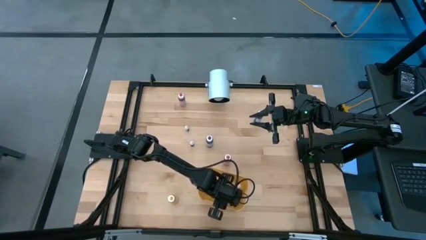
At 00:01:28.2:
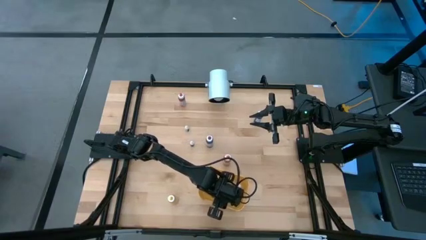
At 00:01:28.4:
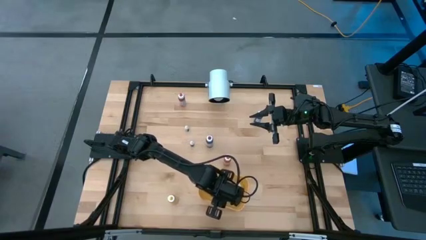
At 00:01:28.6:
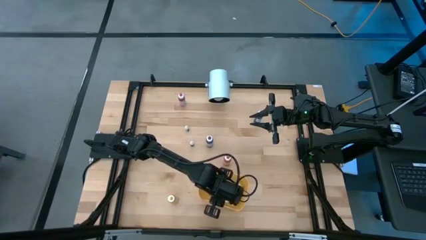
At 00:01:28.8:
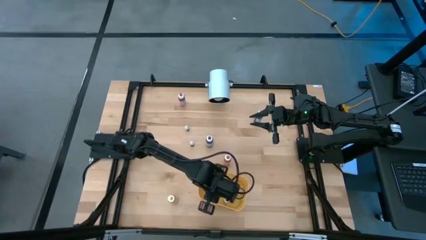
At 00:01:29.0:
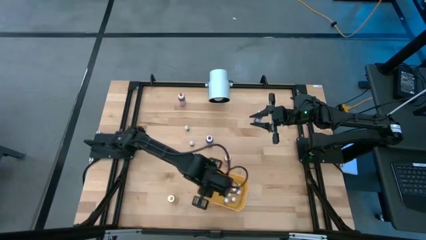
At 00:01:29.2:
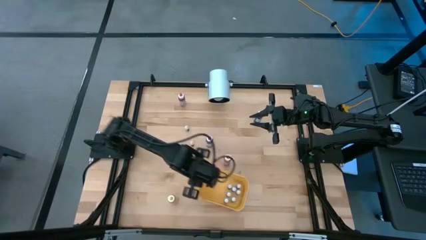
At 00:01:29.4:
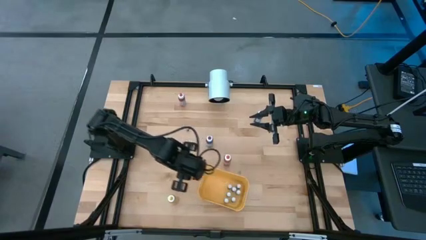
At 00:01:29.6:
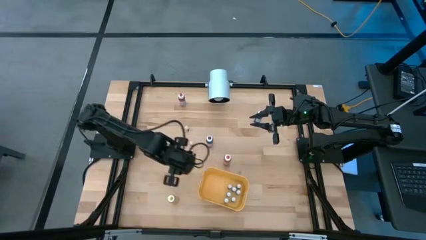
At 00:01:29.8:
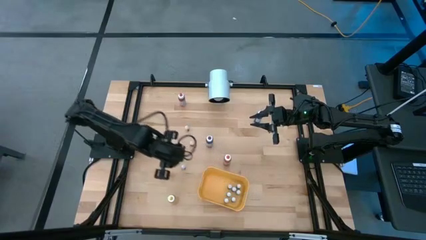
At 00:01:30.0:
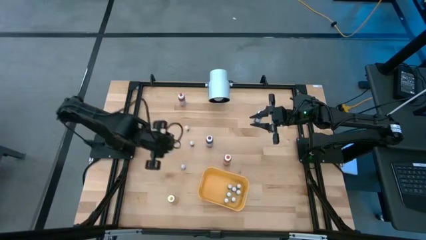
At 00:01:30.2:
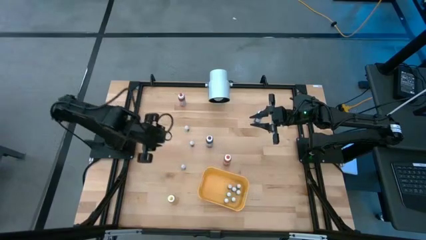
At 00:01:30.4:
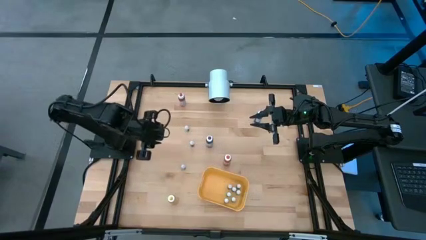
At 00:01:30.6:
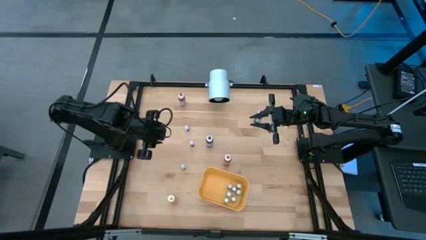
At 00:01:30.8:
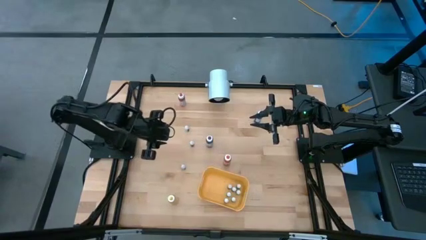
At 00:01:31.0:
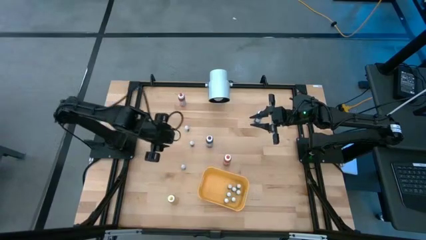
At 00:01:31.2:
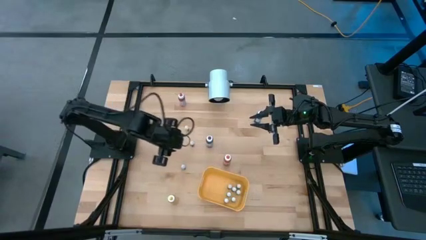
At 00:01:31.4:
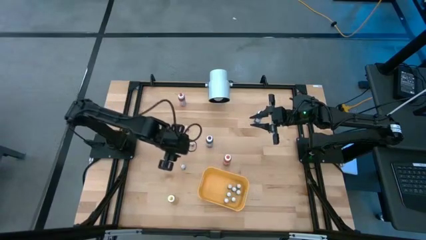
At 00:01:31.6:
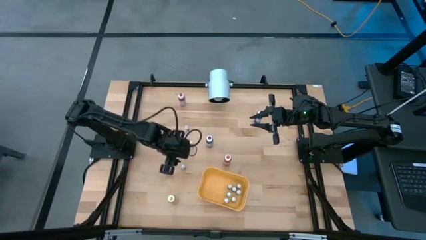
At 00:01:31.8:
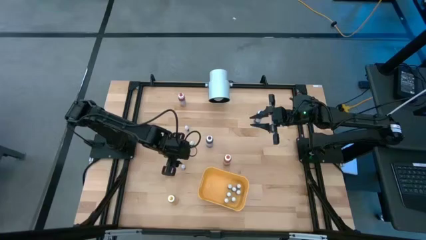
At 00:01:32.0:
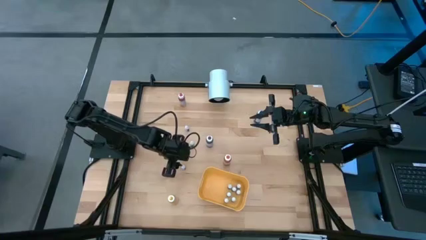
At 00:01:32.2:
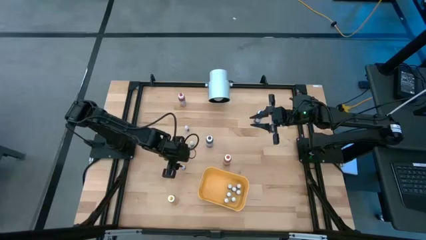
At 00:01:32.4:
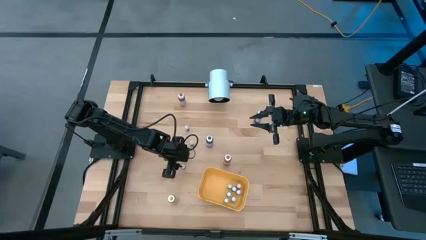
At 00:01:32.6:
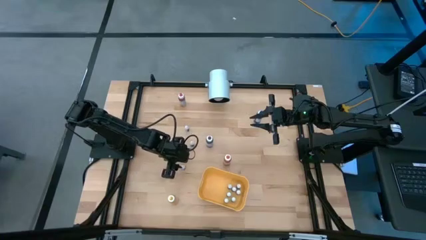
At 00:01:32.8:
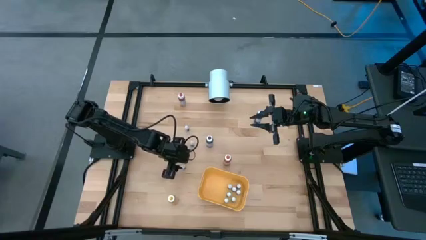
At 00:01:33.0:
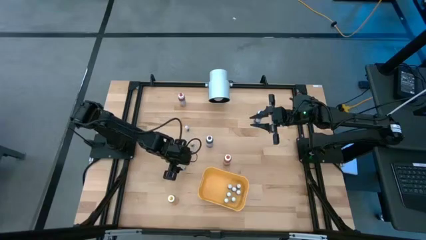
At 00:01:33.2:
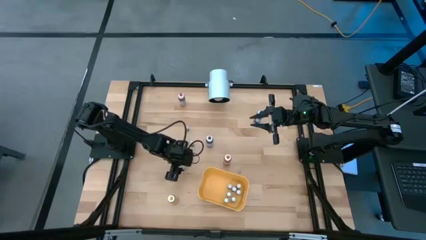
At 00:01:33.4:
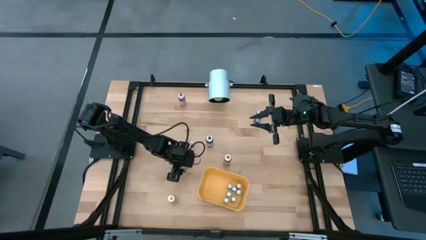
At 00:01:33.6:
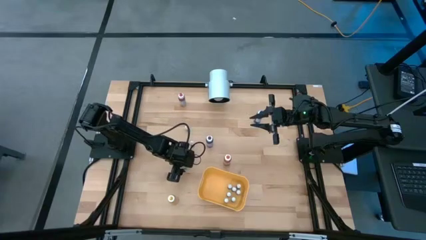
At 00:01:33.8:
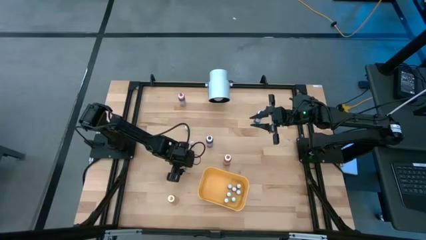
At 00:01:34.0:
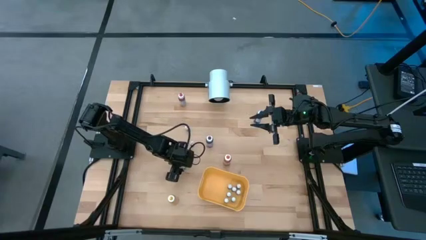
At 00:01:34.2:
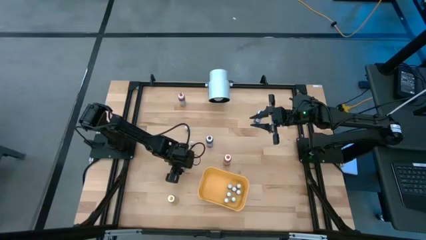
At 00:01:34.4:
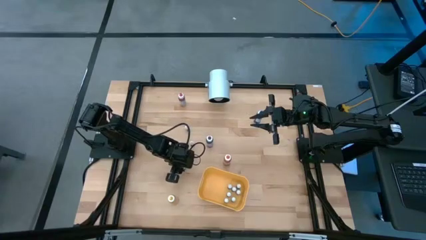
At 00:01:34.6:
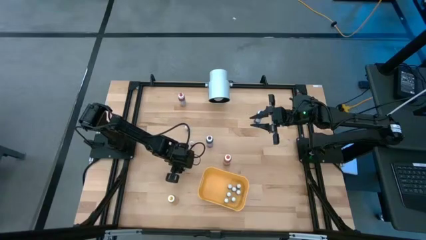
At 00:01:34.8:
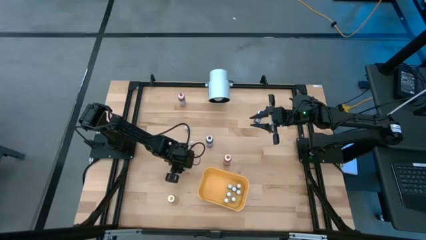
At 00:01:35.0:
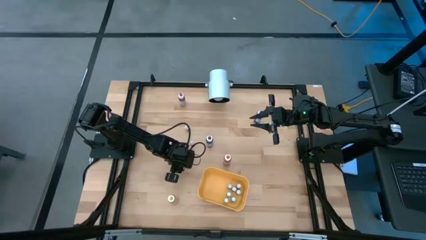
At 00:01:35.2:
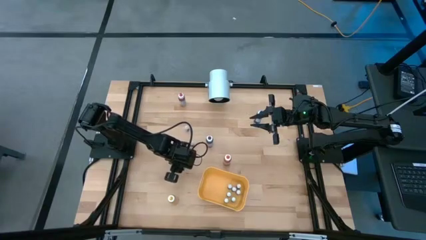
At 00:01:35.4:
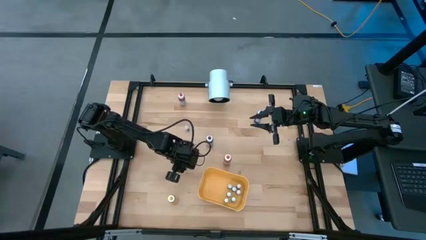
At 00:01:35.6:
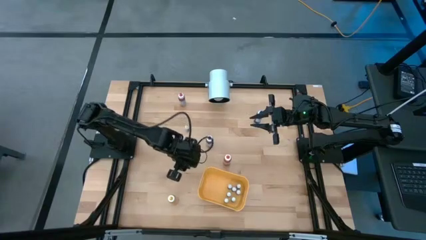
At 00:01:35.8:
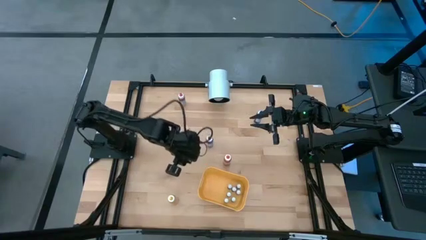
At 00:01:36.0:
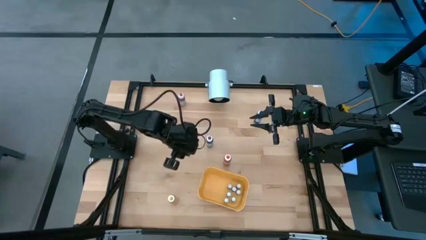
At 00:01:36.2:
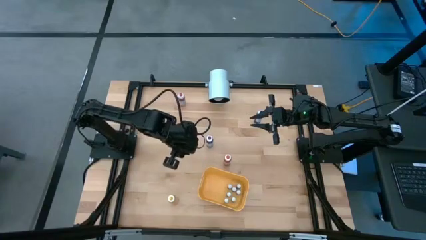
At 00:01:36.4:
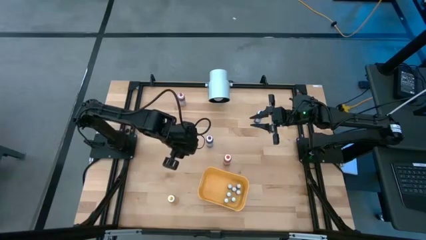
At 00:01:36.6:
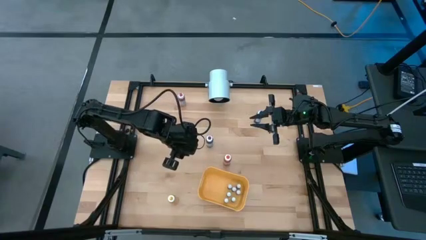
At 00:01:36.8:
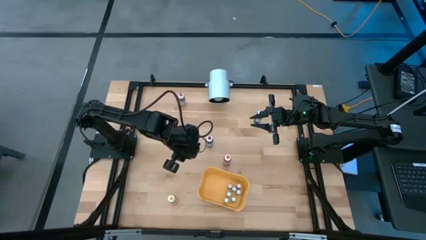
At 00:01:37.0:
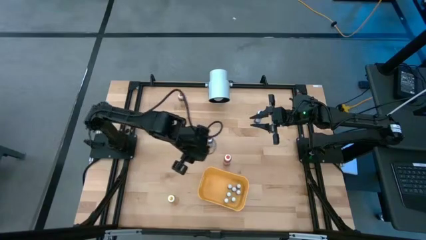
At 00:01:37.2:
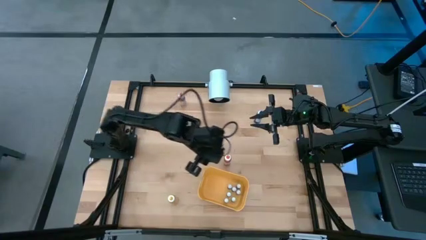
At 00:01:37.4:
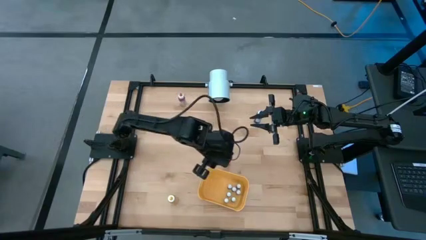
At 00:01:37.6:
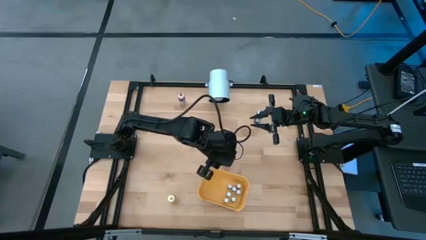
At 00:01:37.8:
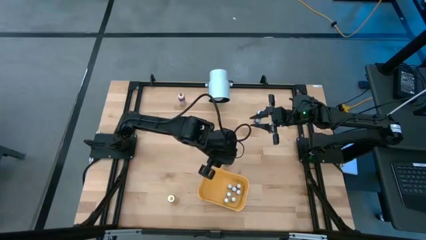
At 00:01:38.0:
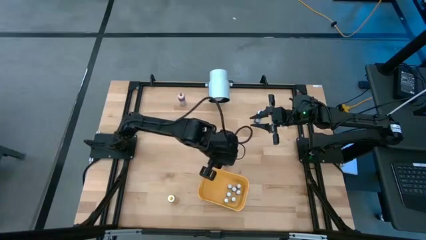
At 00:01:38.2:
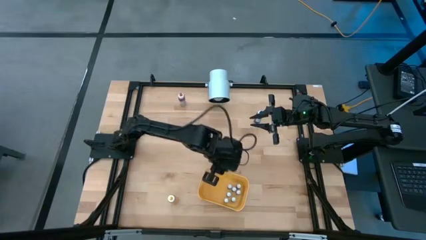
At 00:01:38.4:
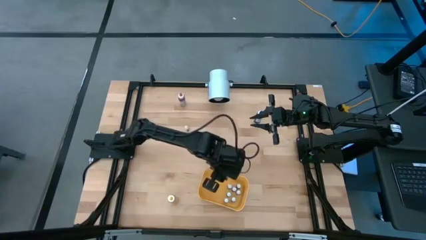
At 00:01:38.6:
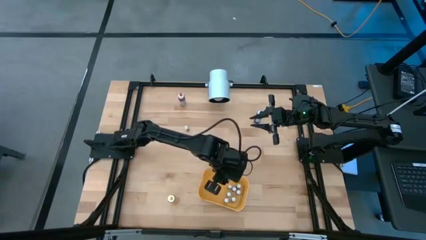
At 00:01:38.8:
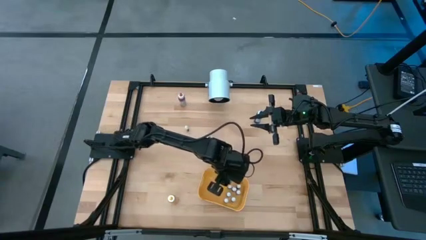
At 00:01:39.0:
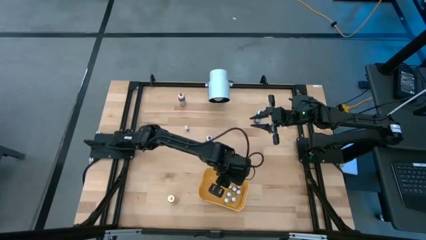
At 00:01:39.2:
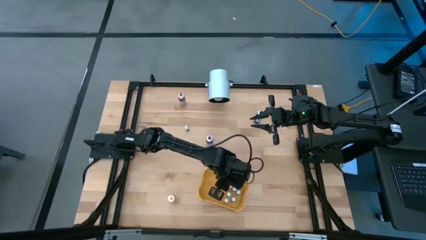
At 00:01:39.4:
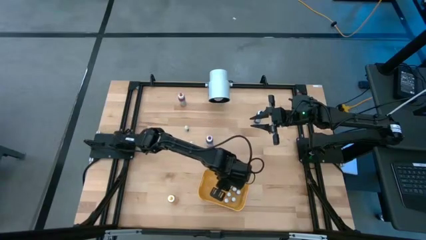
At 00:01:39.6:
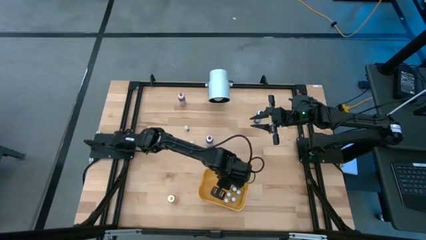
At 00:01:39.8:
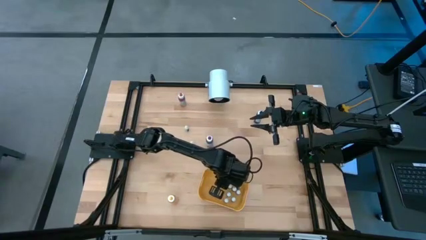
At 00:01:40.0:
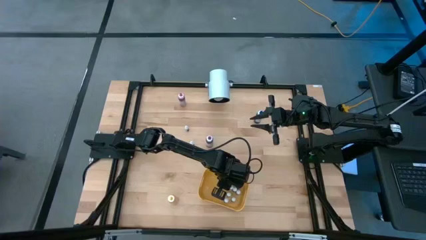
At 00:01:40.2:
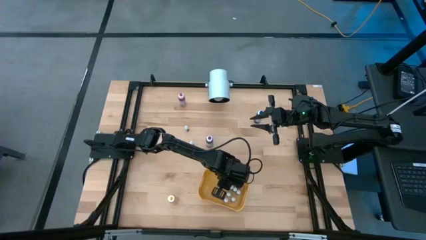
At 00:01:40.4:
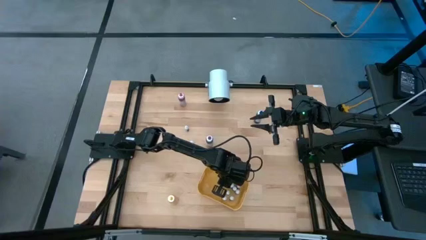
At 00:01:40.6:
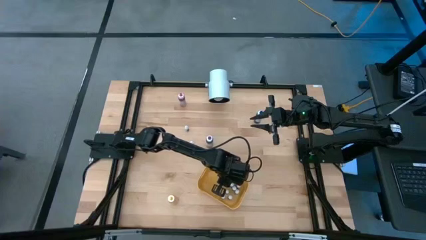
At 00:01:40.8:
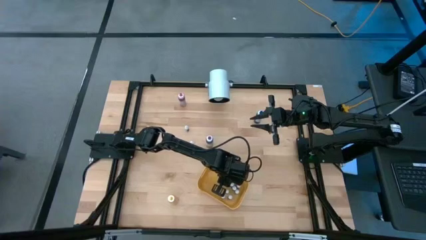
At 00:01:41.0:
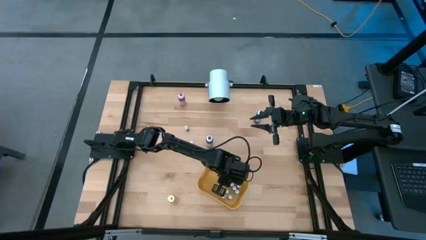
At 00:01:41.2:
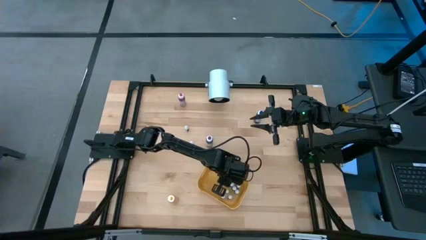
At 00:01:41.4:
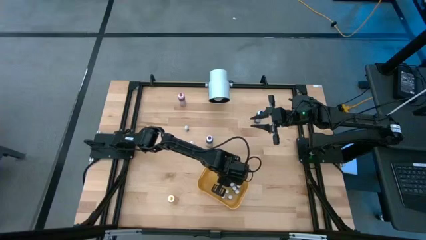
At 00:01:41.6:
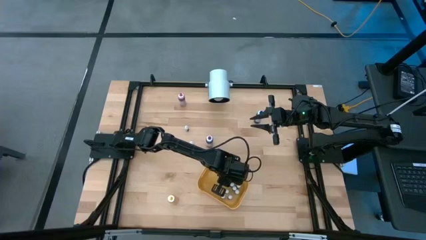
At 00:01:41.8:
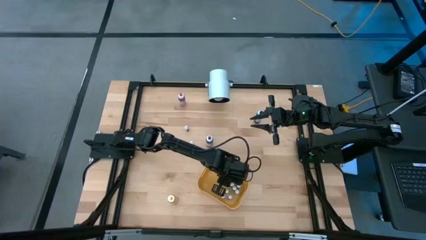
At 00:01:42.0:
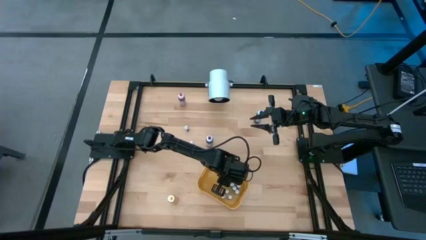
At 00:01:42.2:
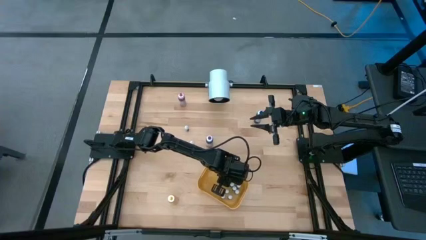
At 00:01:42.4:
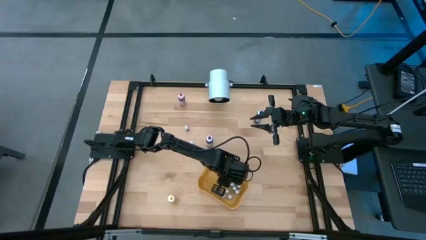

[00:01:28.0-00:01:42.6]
Task: Pick & Place food coloring
Put the small black food coloring bottle into the yellow container
